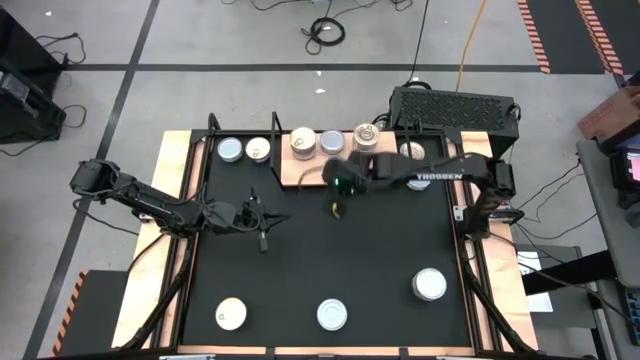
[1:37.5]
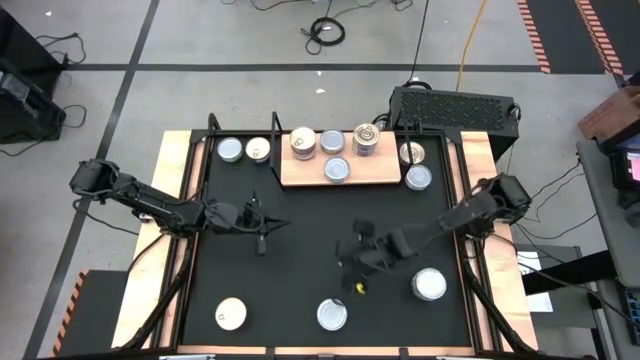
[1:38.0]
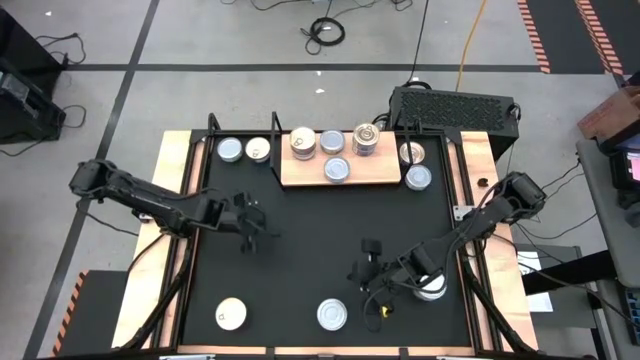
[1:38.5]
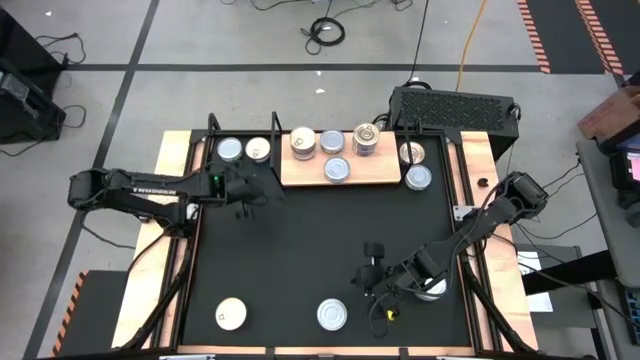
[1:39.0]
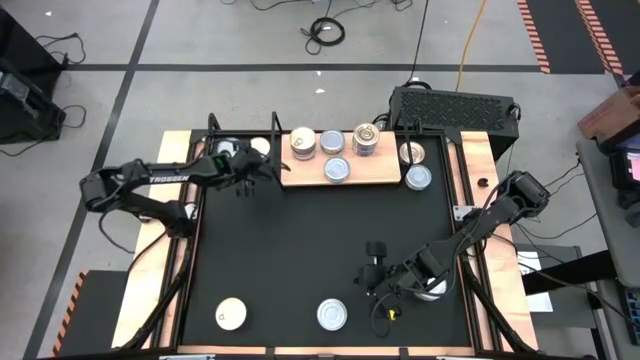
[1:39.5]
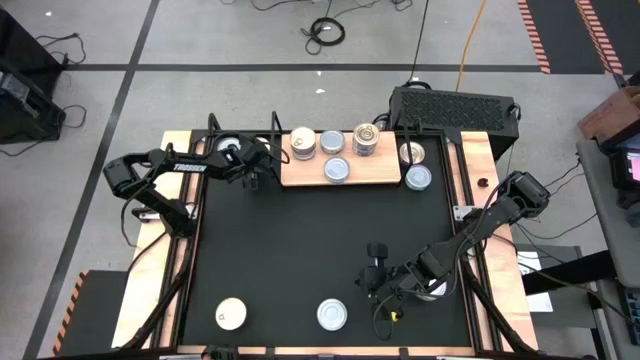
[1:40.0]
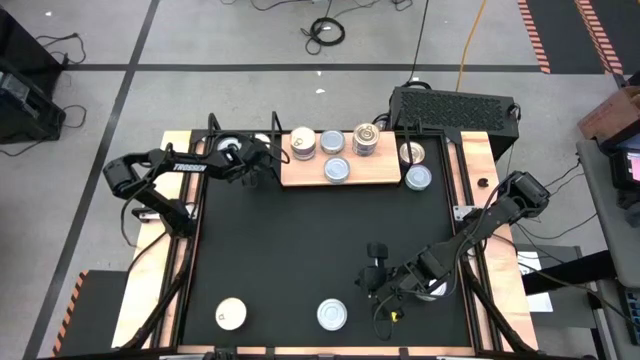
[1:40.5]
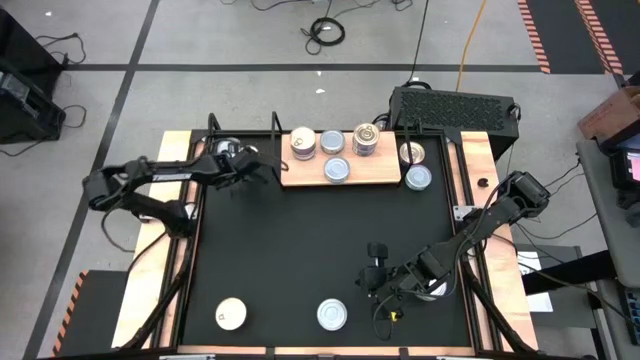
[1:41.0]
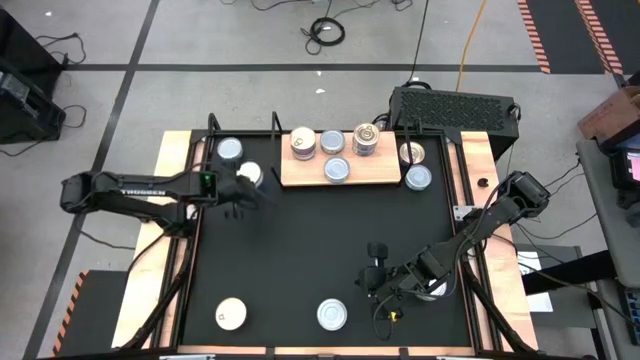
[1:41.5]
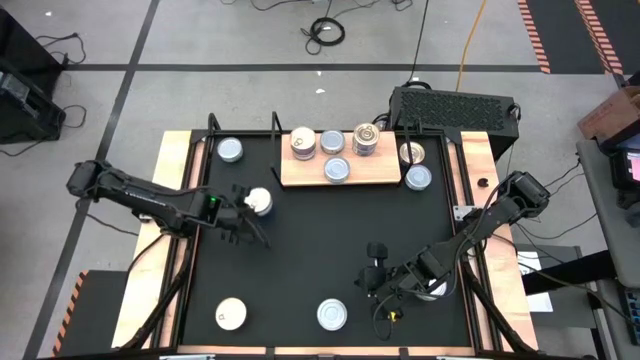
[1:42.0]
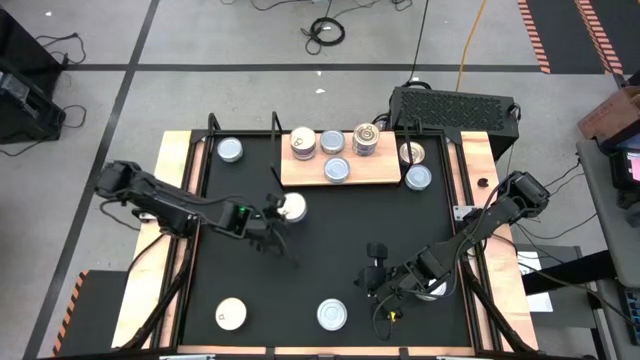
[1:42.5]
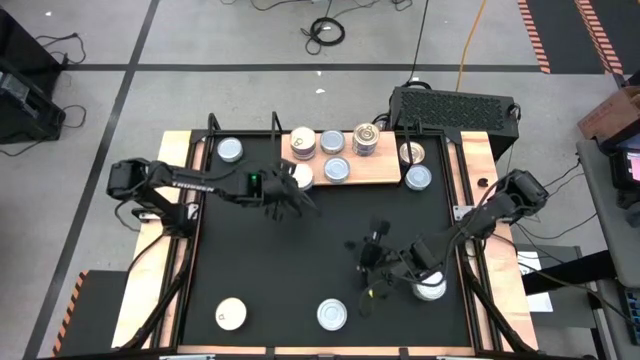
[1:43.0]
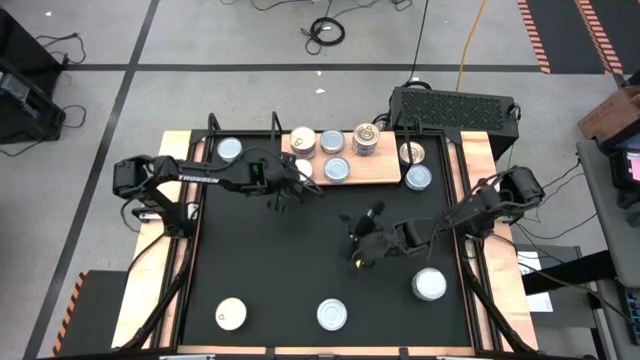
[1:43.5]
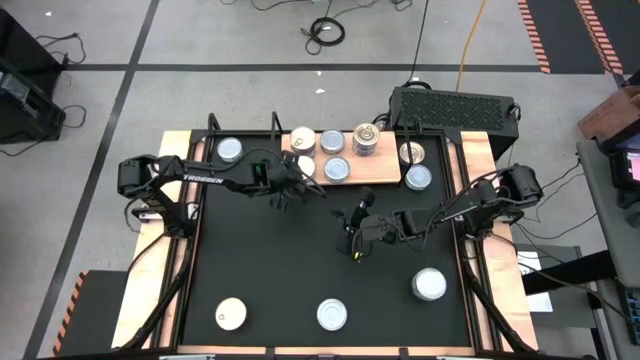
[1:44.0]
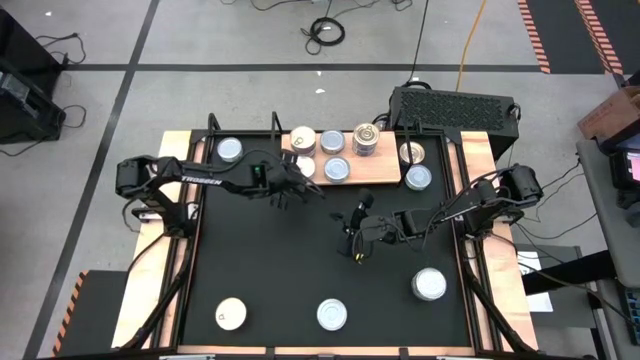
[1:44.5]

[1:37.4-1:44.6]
Task: Stack canned seafood by type on shelf
Put the left blue tuna can on the shelf

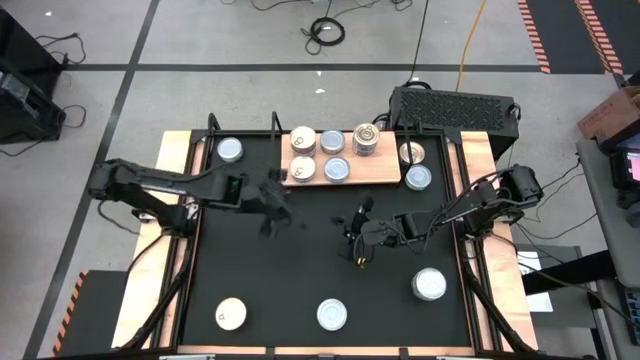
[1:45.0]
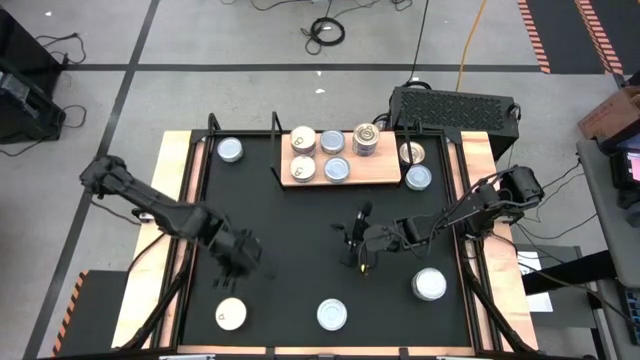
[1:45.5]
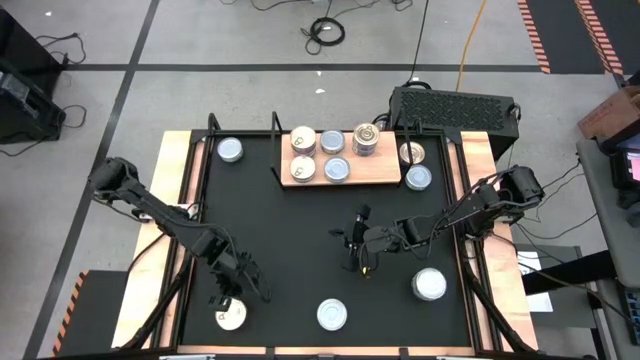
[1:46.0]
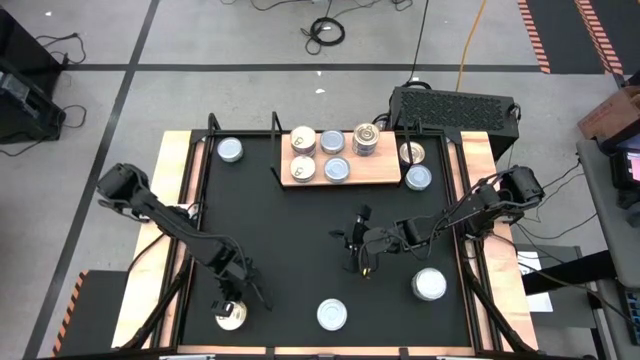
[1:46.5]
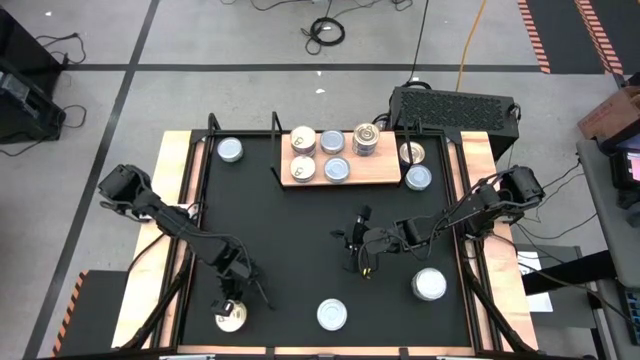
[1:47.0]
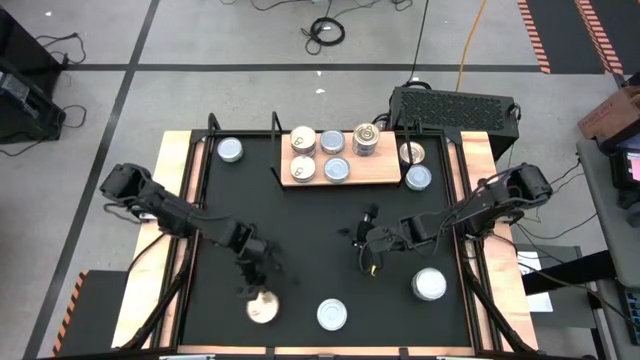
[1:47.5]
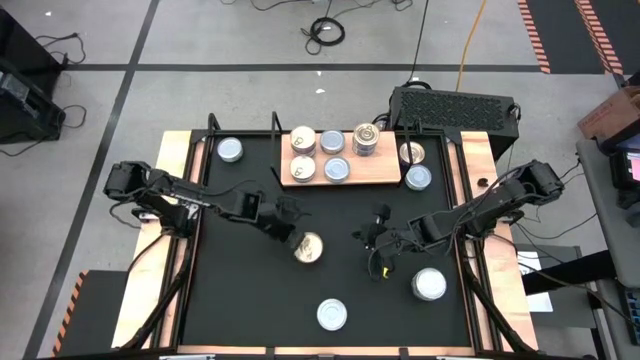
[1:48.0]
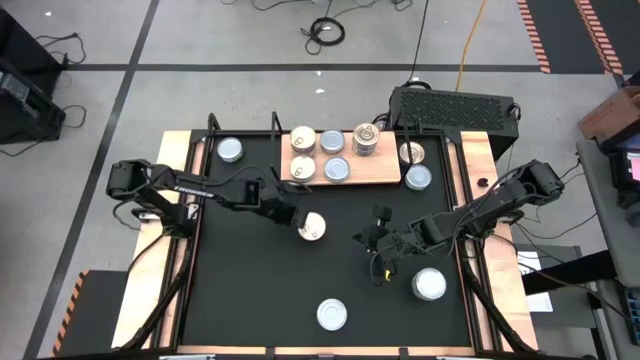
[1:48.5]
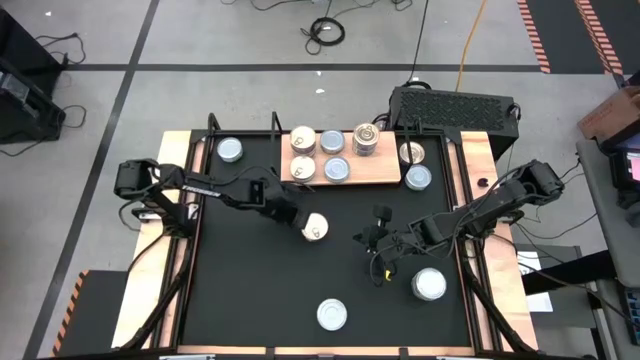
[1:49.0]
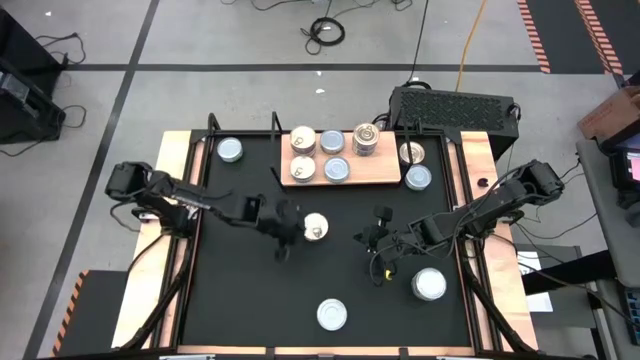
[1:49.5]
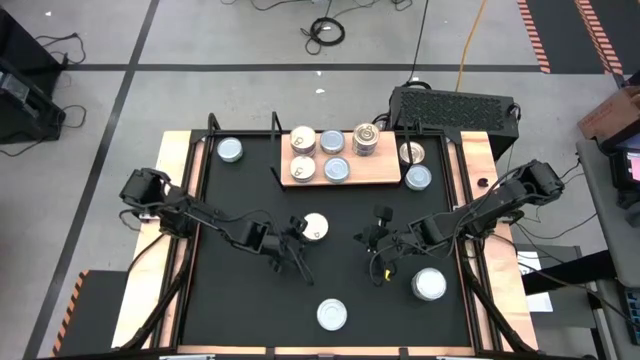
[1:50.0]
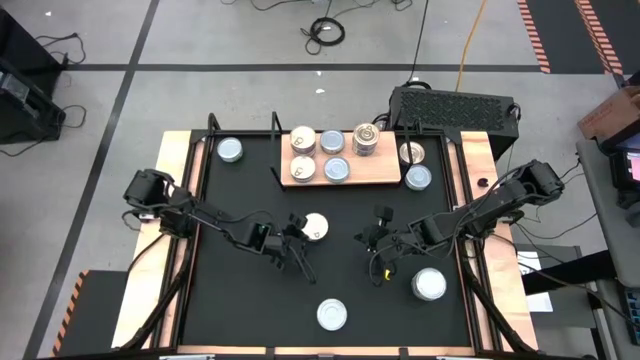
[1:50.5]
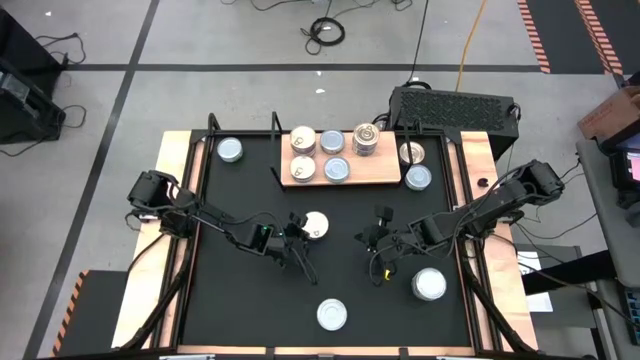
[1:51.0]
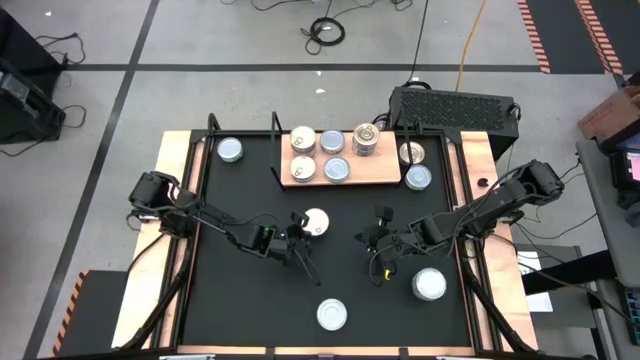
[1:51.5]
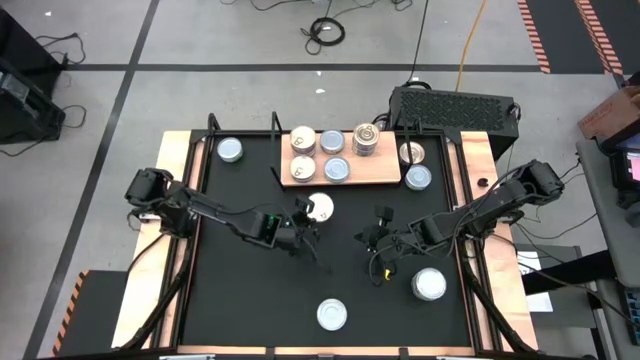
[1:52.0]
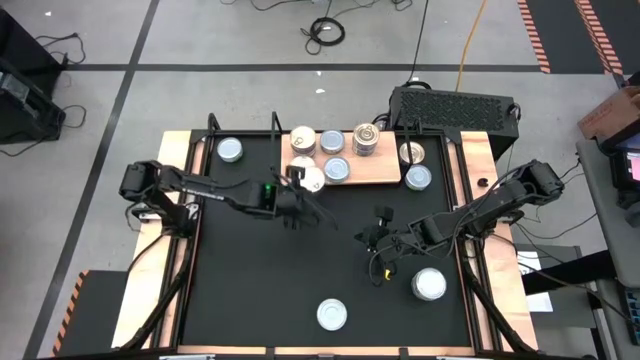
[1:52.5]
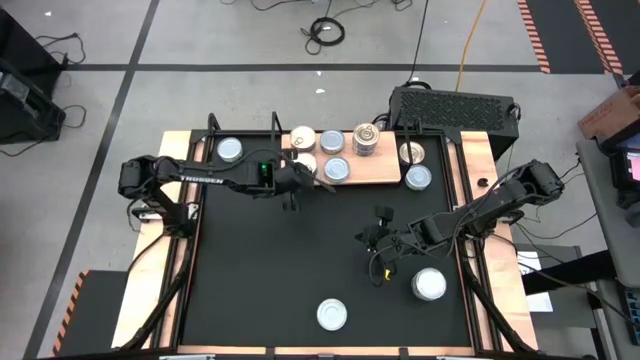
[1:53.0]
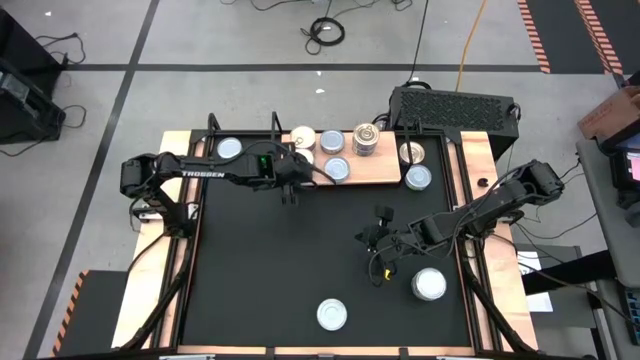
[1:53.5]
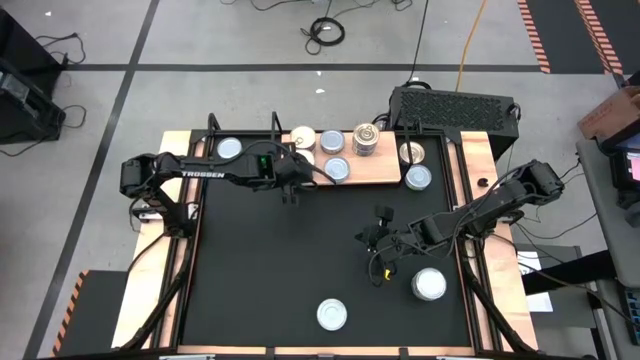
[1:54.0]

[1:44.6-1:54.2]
Stack the bottom blue tuna can on top of the blue tuna can on the shelf
